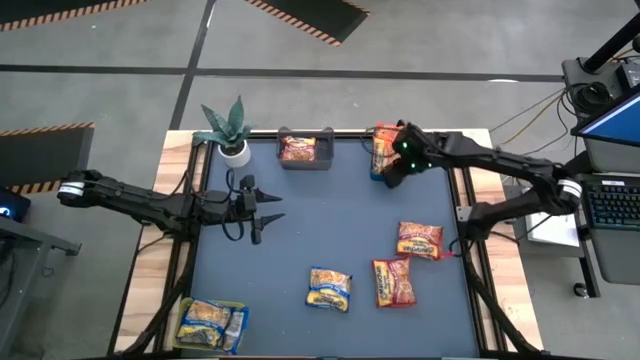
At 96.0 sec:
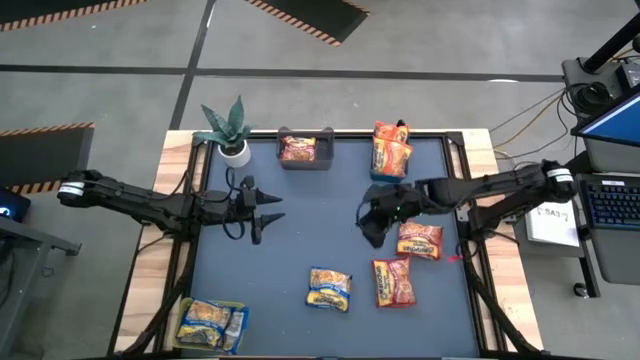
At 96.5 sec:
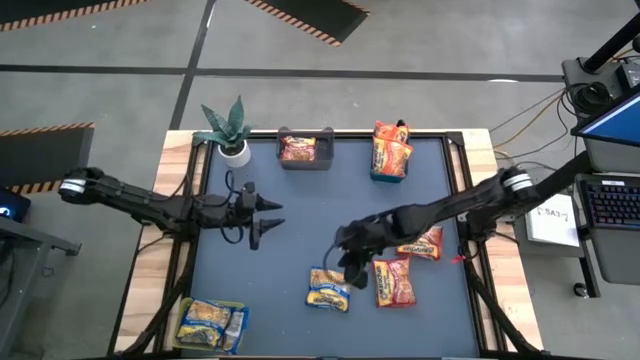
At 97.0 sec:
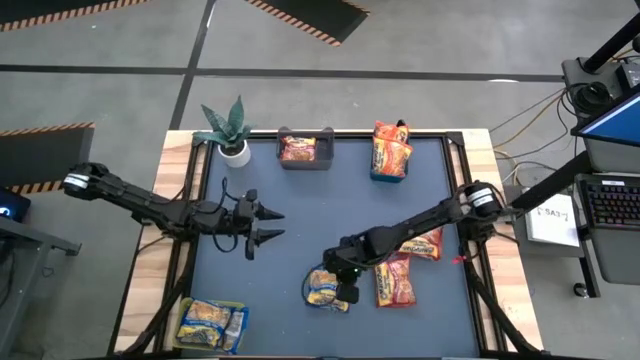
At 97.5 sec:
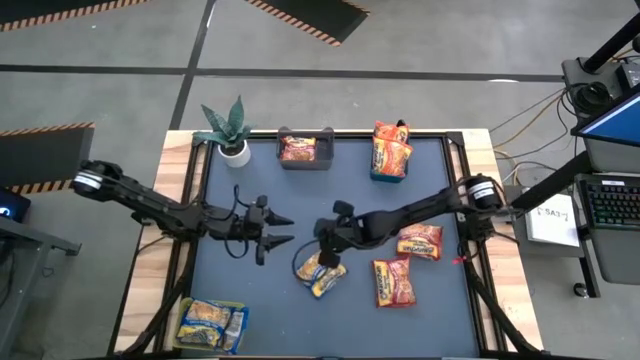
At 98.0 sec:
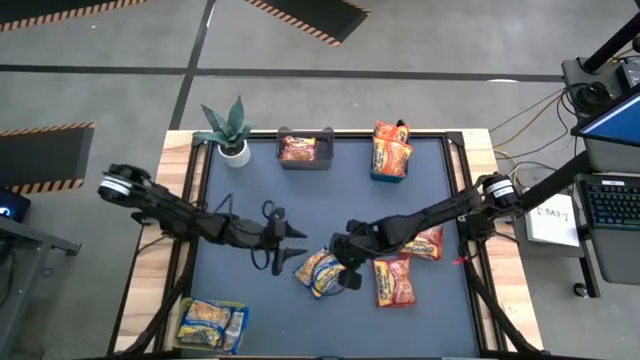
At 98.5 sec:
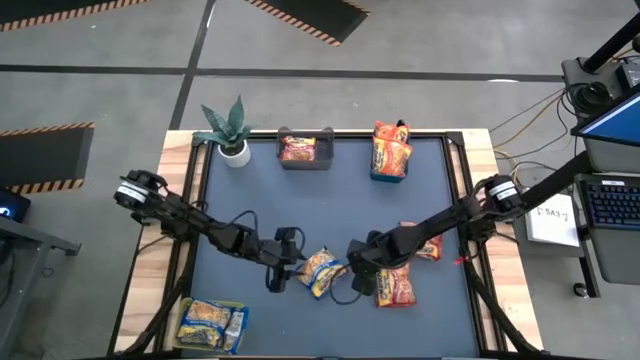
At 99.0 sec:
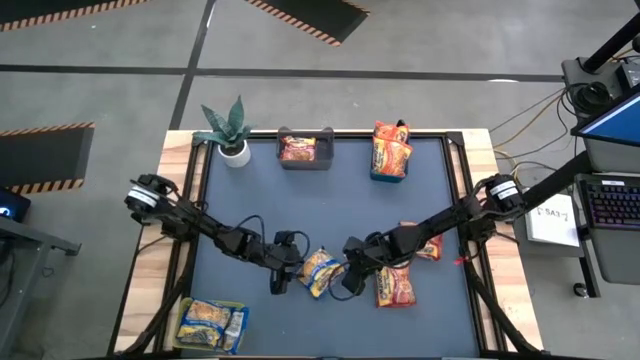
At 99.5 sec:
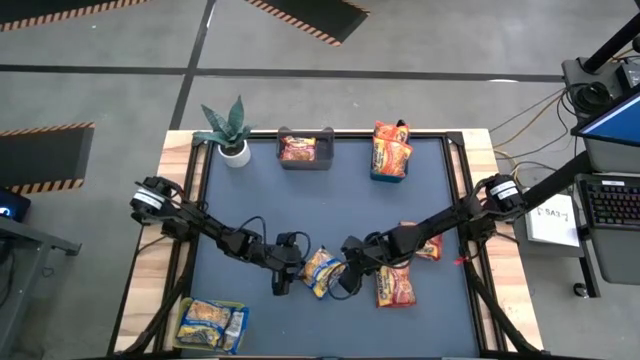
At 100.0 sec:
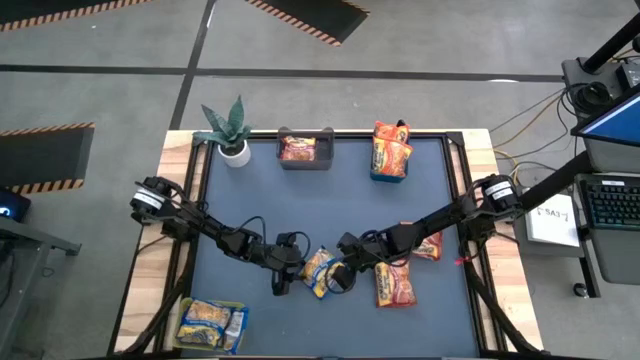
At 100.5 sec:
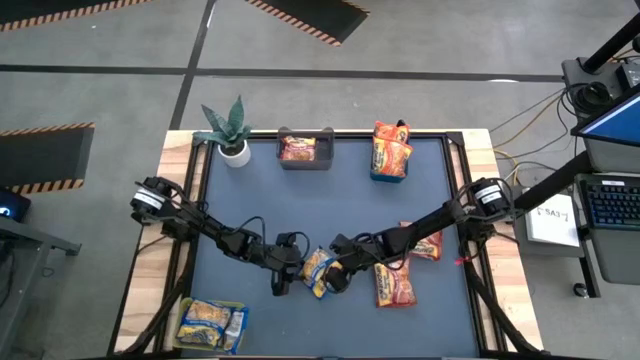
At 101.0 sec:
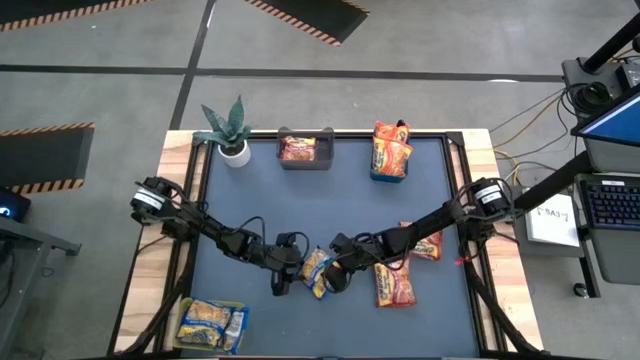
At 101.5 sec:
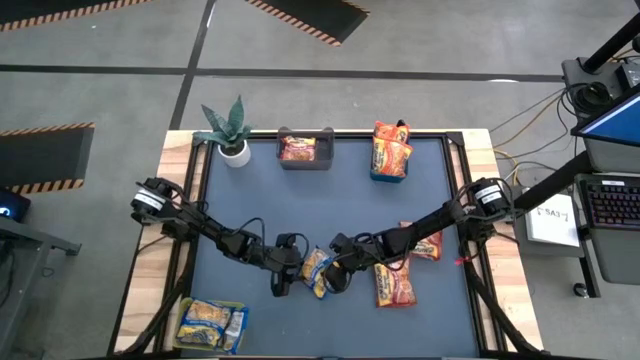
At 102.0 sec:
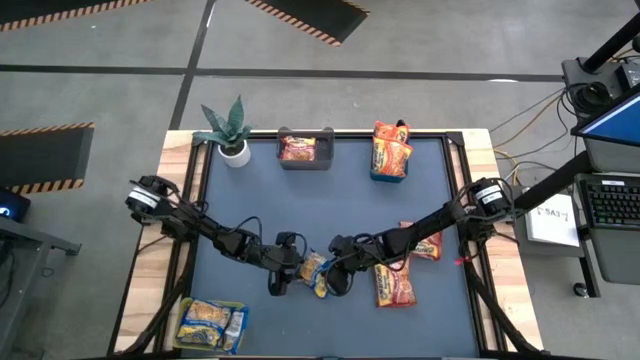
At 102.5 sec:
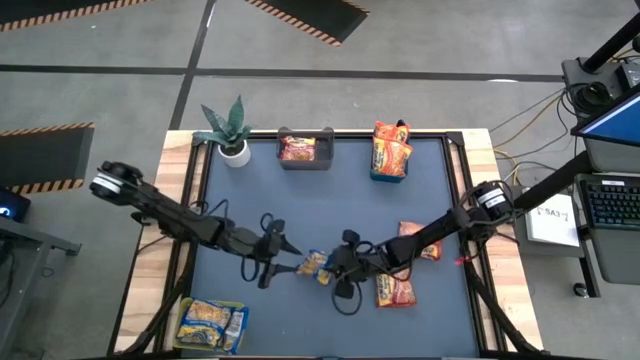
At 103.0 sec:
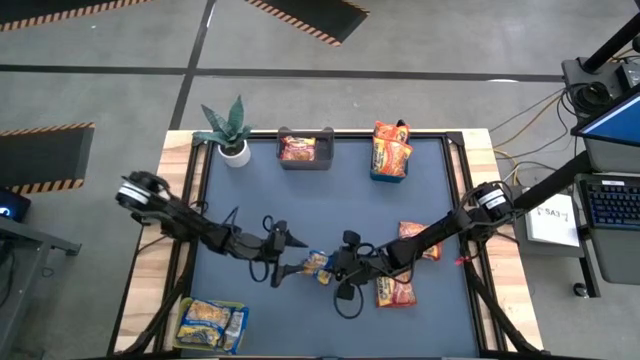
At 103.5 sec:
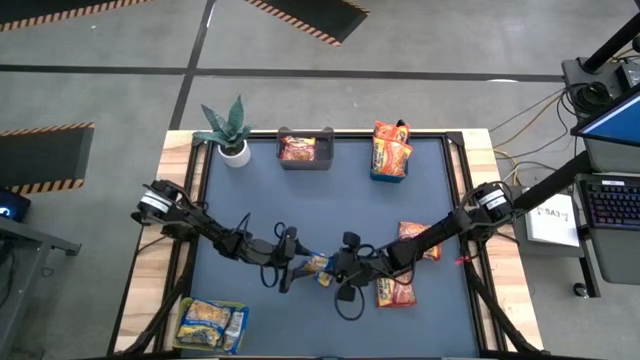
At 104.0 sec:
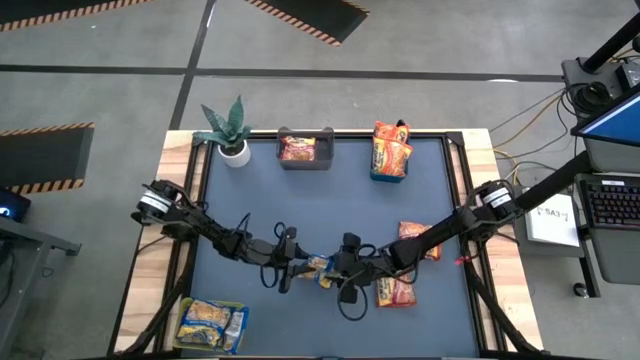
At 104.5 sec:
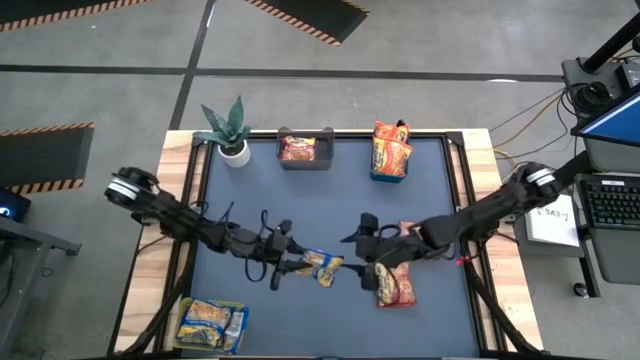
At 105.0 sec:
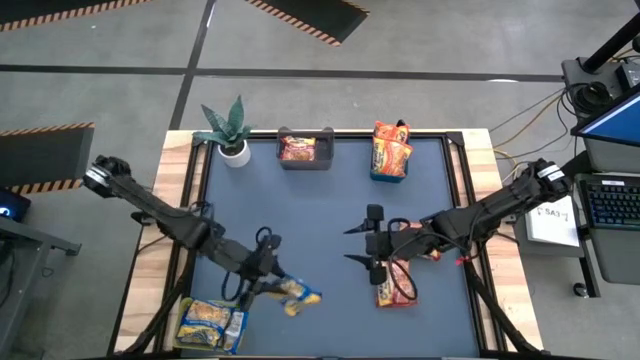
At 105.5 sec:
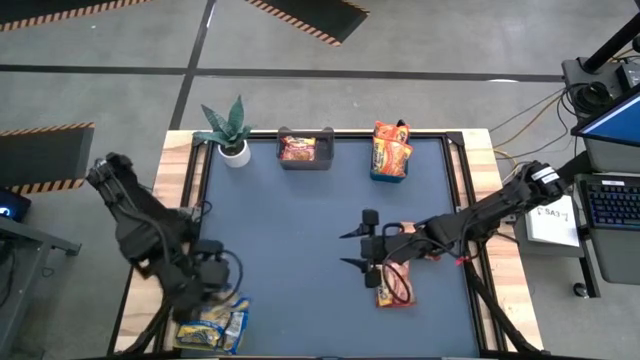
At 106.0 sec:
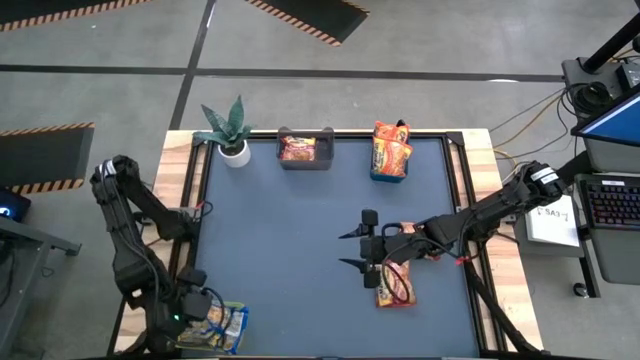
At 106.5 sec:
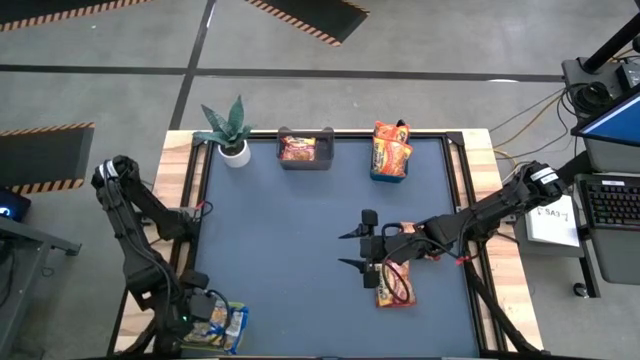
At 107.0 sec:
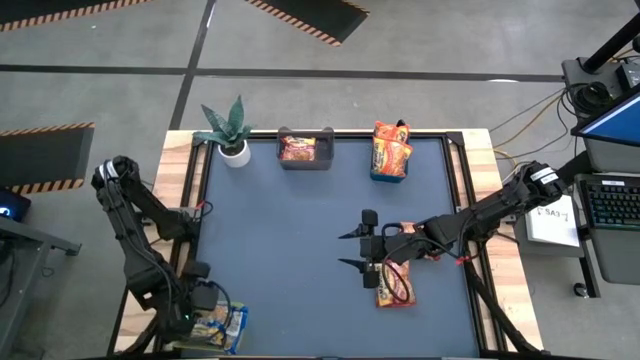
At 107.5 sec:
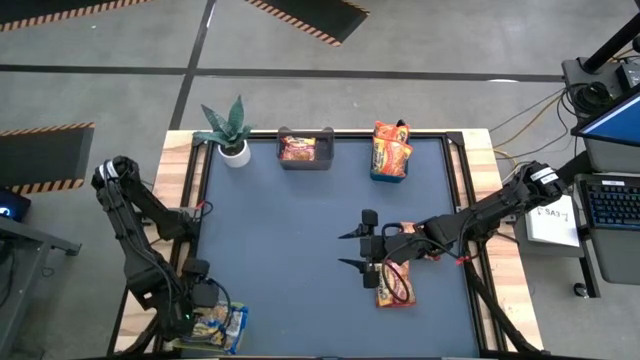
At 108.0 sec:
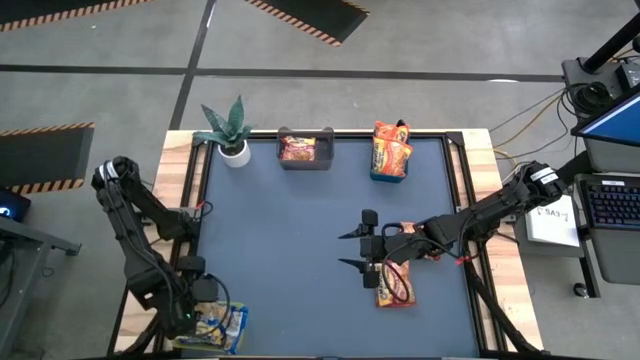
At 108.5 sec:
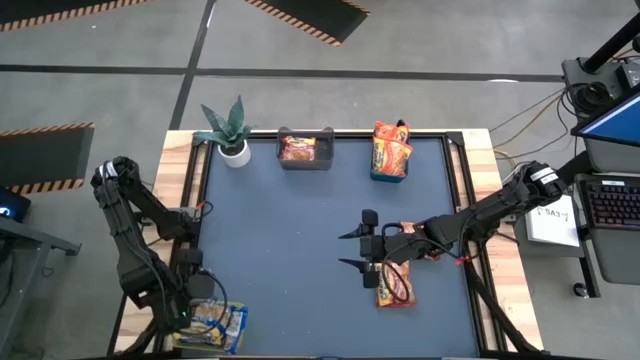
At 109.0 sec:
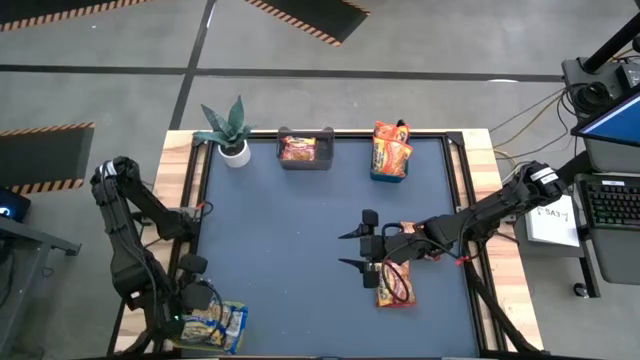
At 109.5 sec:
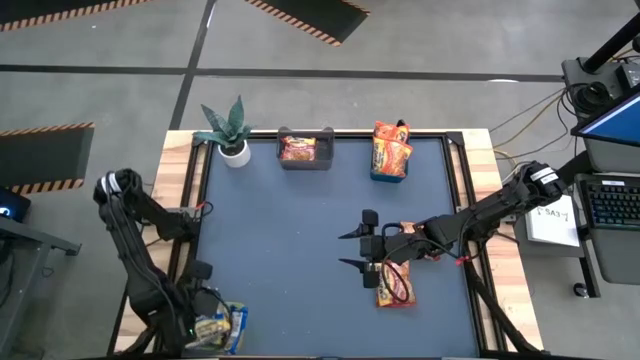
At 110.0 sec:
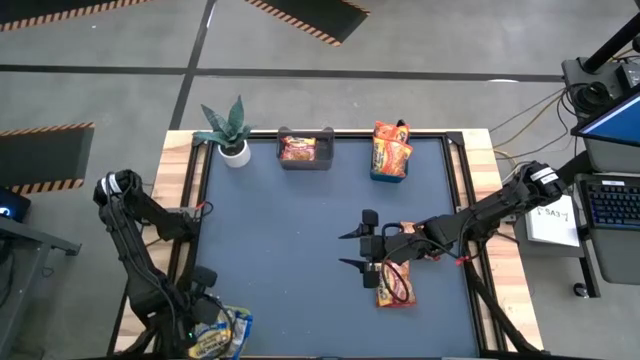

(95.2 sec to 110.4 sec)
Task: Sort Maruchan noodles
Put the blue noodle pack into the yellow bin

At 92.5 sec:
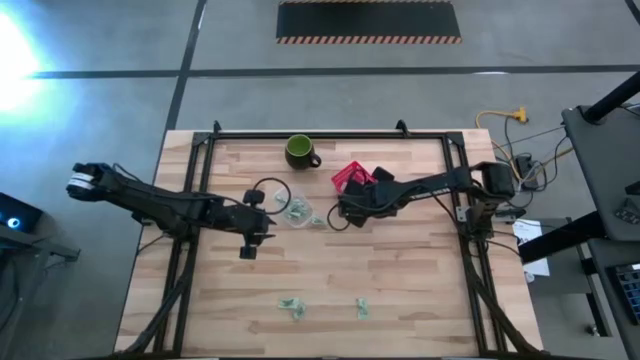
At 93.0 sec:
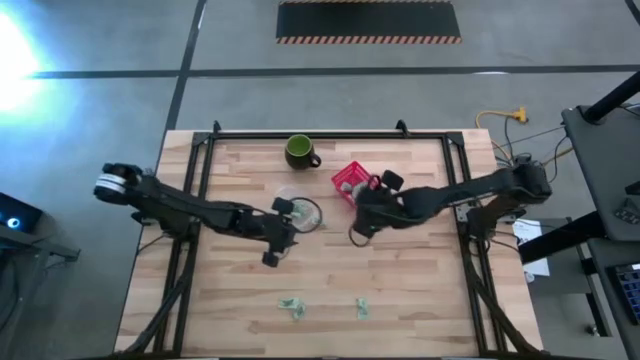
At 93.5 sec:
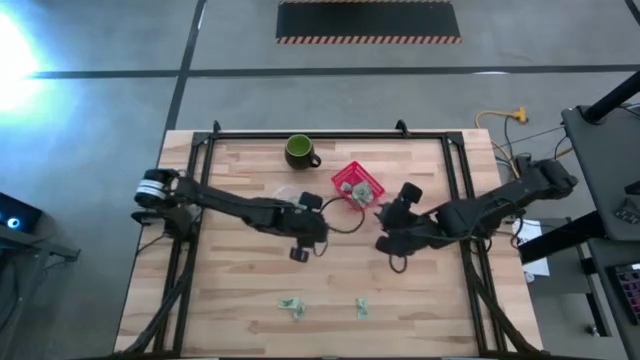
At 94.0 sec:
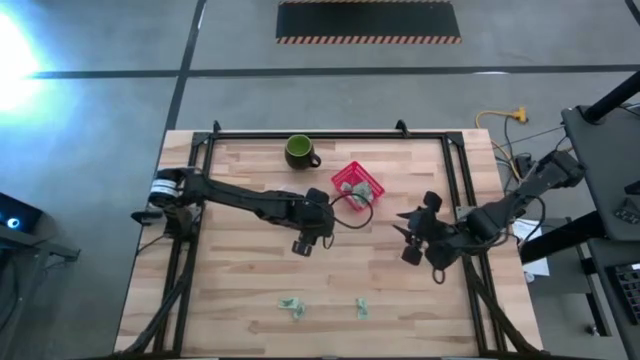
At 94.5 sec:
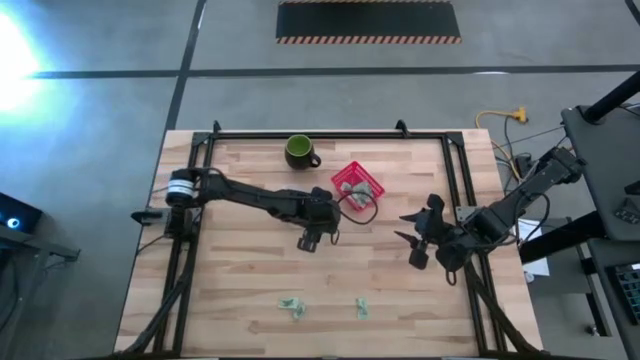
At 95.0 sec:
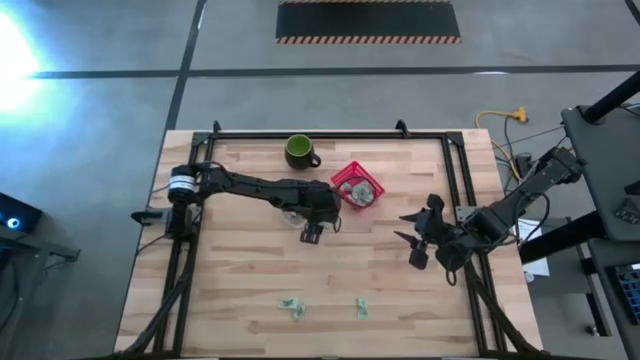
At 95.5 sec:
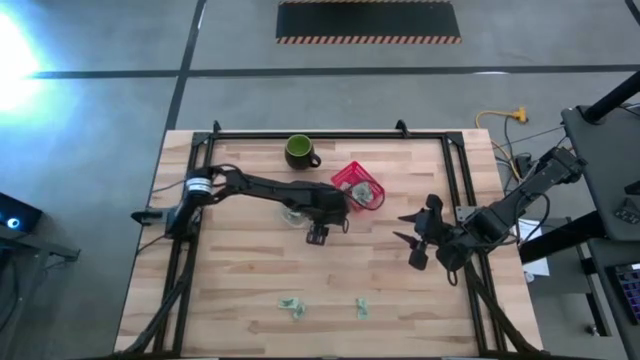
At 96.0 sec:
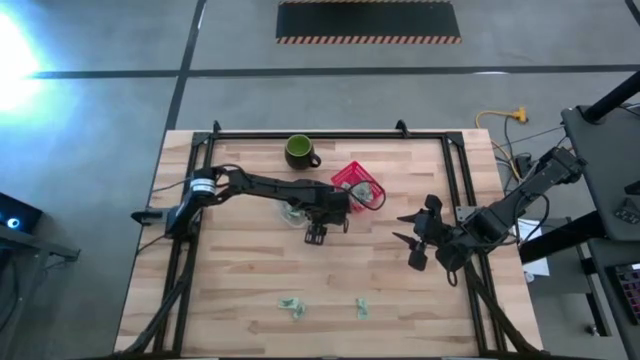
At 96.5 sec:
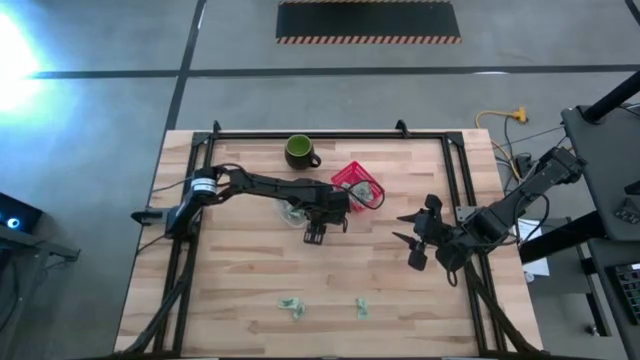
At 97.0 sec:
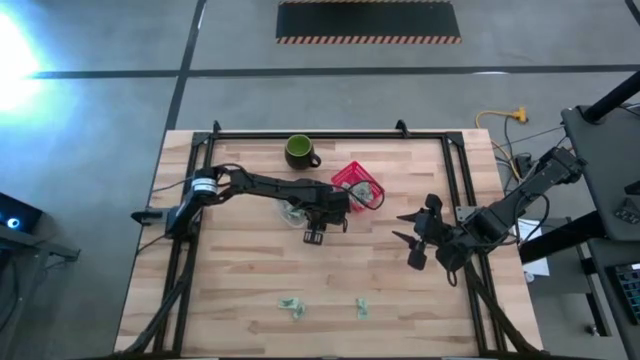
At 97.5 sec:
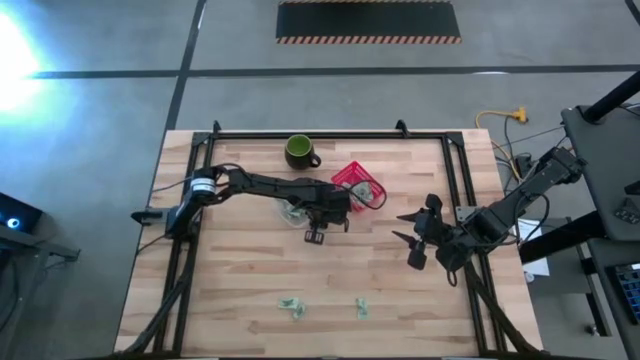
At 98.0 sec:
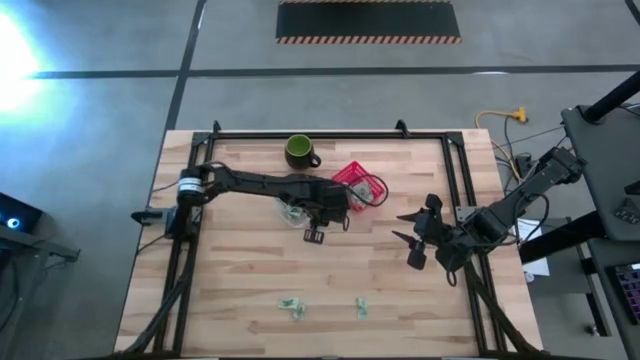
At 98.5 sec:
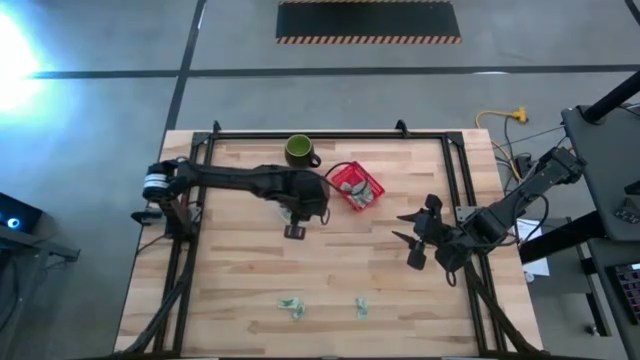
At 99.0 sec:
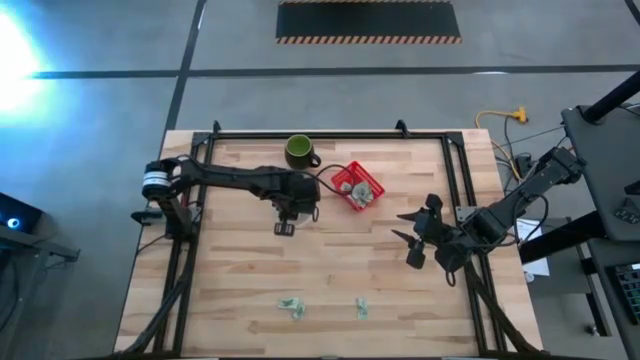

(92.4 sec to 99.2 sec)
Task: Pick and place items into bin
Put the stevia packet into the transparent bin
